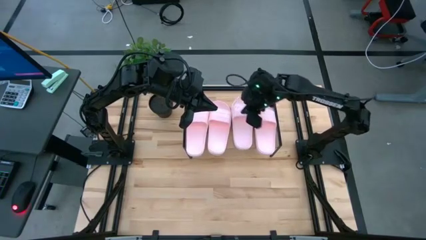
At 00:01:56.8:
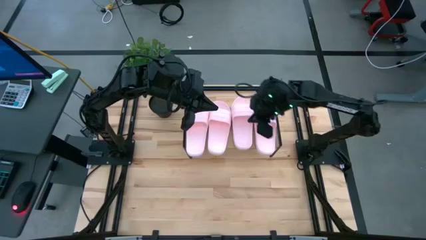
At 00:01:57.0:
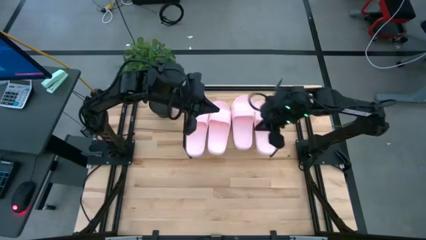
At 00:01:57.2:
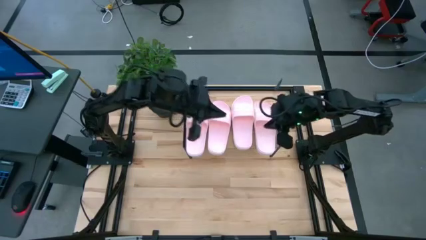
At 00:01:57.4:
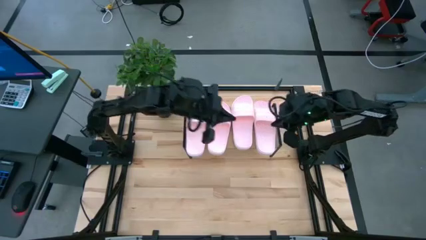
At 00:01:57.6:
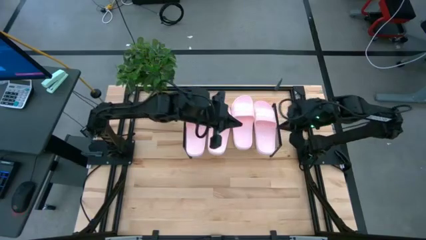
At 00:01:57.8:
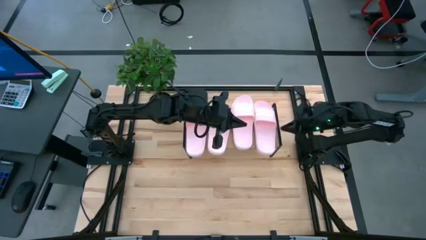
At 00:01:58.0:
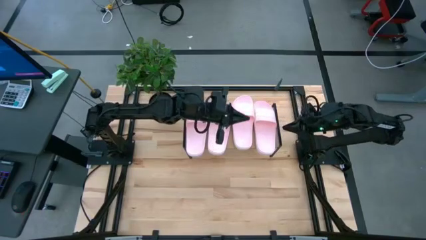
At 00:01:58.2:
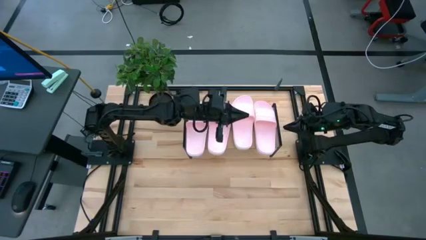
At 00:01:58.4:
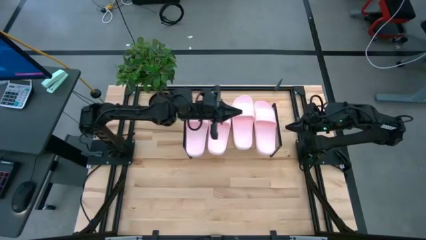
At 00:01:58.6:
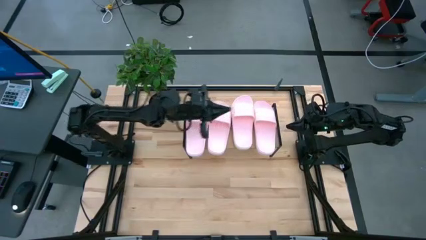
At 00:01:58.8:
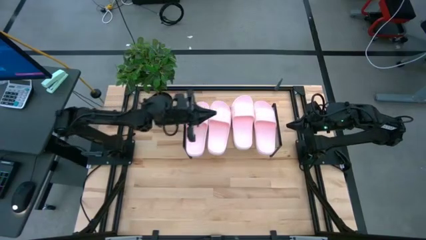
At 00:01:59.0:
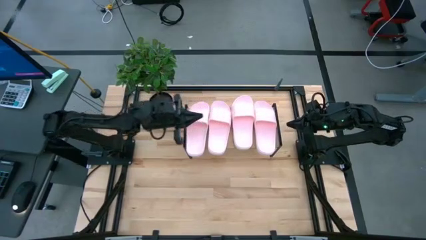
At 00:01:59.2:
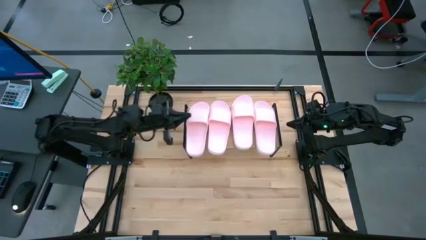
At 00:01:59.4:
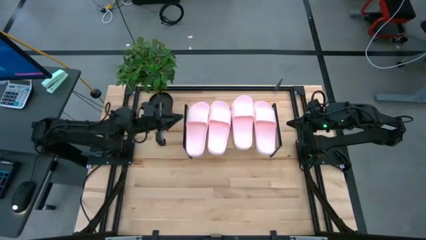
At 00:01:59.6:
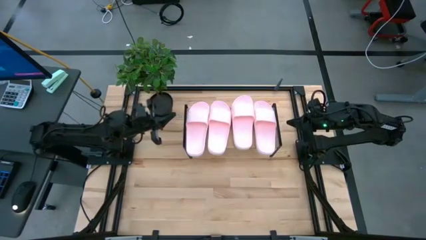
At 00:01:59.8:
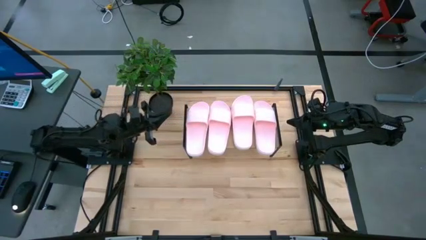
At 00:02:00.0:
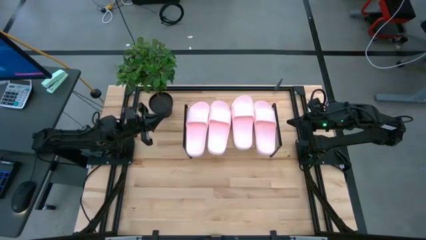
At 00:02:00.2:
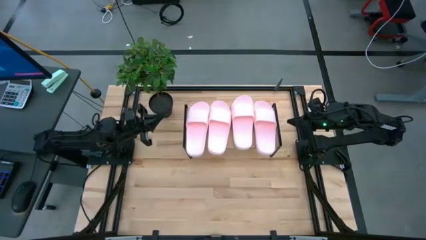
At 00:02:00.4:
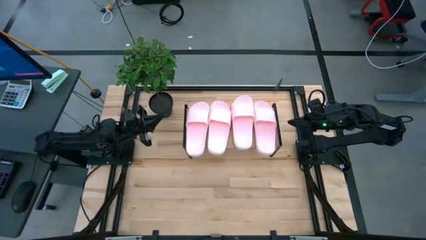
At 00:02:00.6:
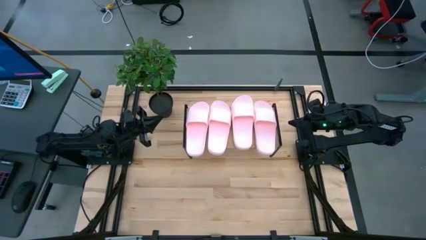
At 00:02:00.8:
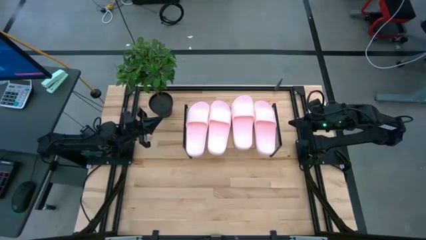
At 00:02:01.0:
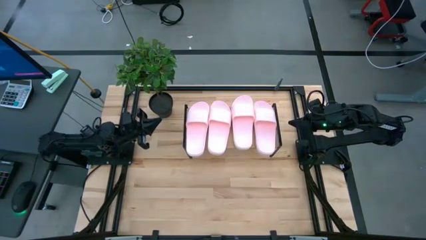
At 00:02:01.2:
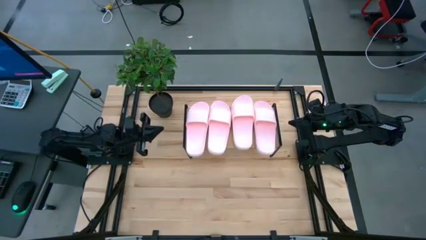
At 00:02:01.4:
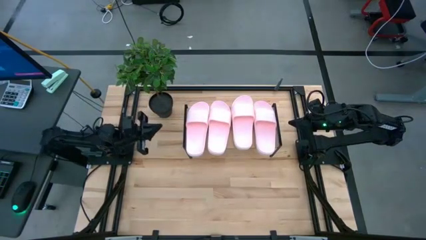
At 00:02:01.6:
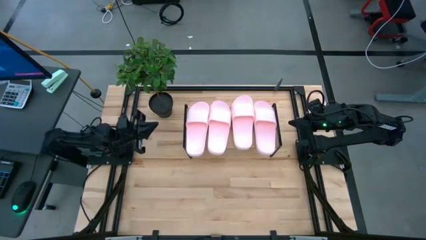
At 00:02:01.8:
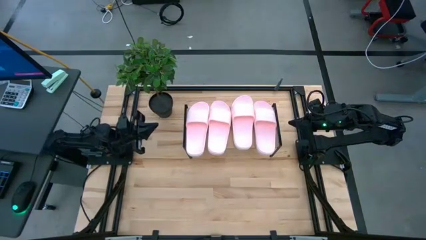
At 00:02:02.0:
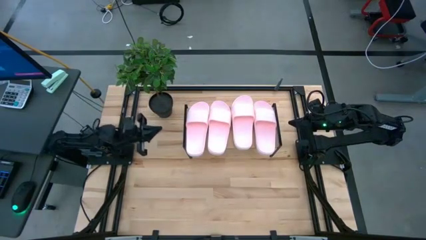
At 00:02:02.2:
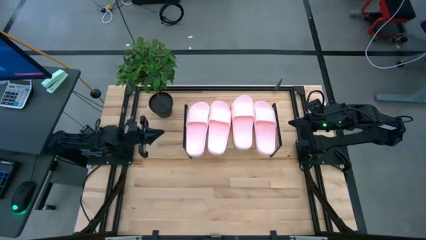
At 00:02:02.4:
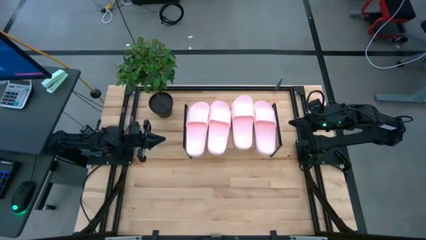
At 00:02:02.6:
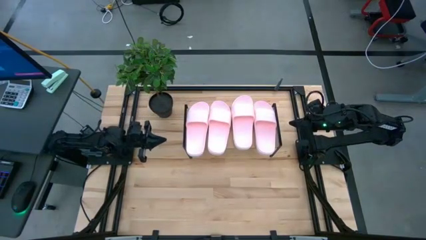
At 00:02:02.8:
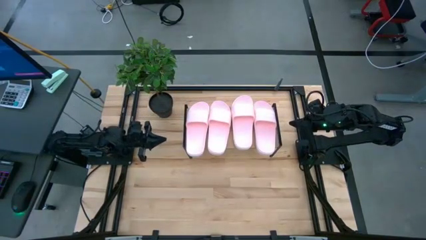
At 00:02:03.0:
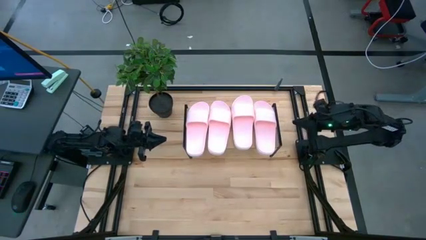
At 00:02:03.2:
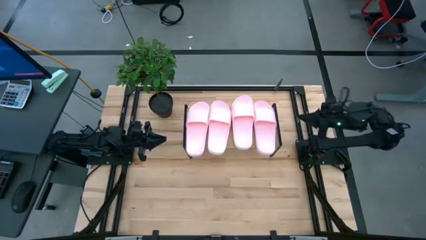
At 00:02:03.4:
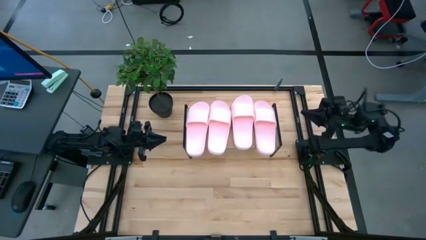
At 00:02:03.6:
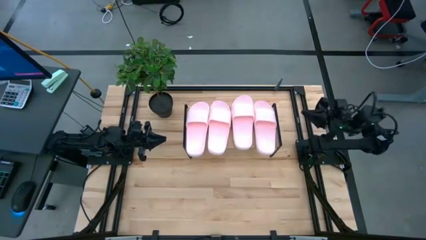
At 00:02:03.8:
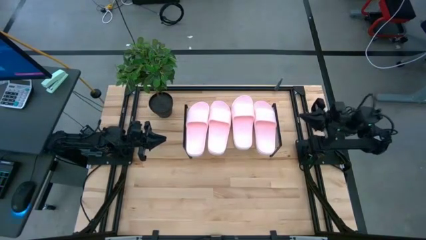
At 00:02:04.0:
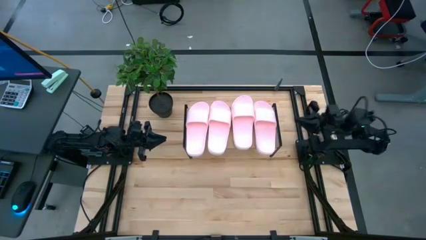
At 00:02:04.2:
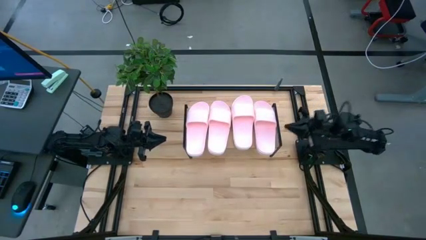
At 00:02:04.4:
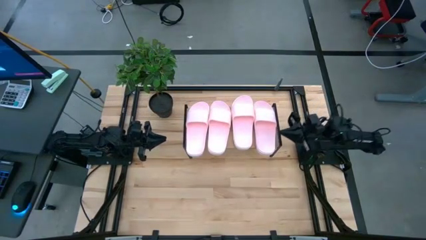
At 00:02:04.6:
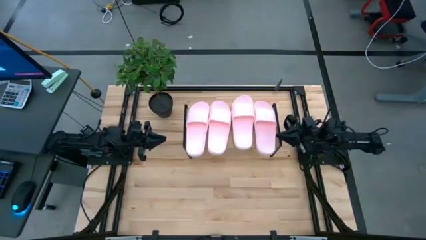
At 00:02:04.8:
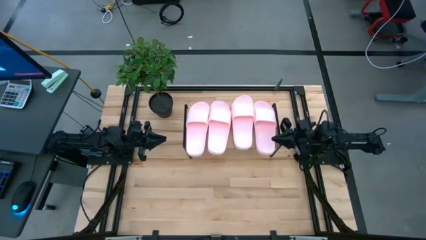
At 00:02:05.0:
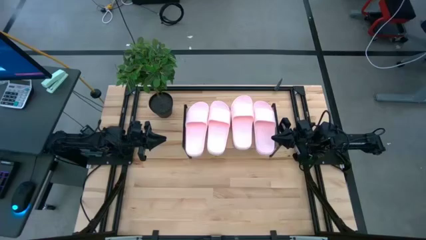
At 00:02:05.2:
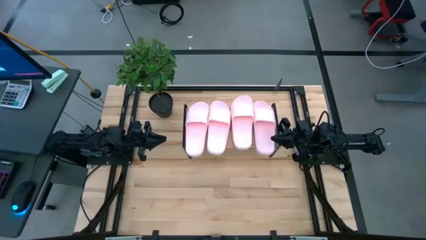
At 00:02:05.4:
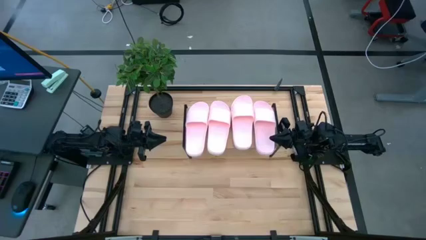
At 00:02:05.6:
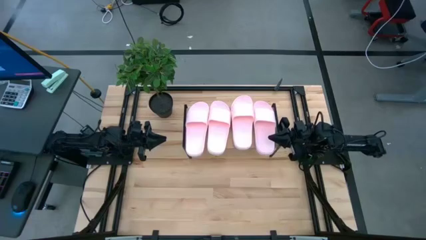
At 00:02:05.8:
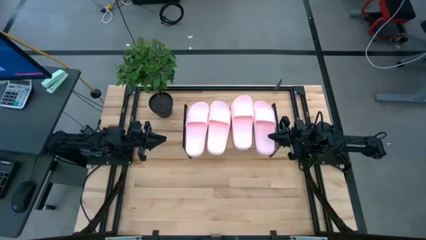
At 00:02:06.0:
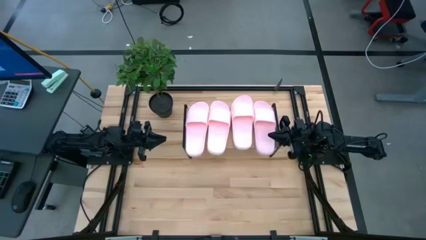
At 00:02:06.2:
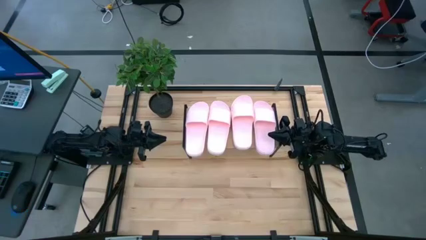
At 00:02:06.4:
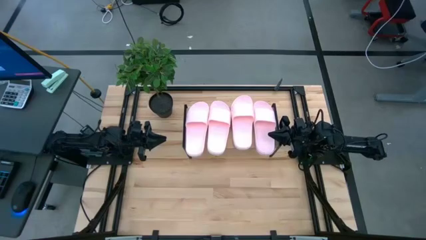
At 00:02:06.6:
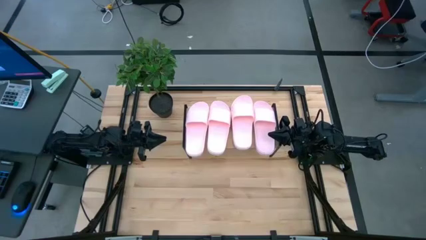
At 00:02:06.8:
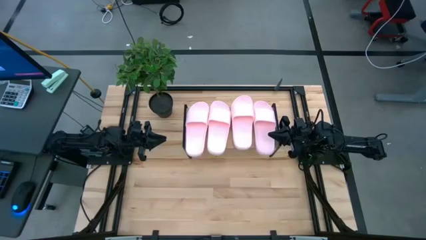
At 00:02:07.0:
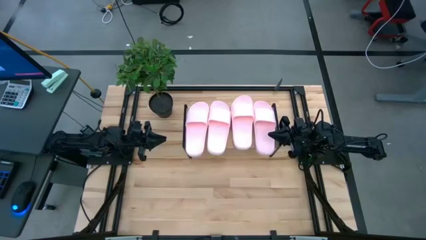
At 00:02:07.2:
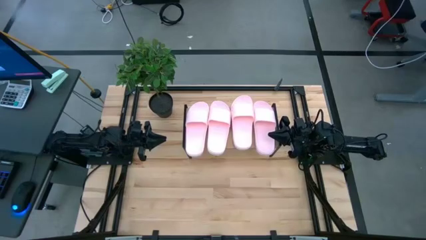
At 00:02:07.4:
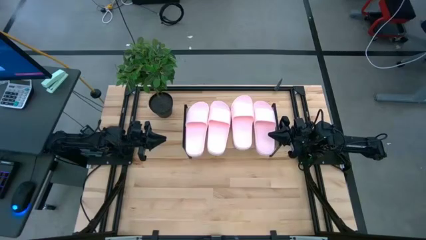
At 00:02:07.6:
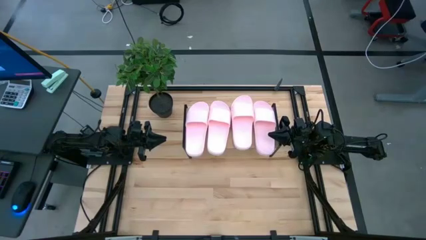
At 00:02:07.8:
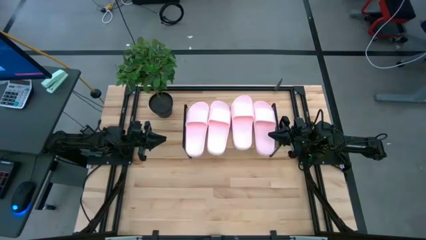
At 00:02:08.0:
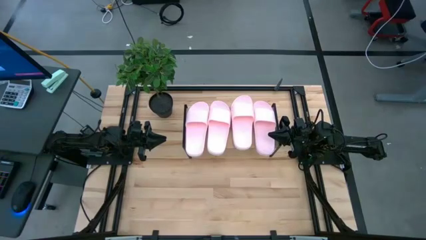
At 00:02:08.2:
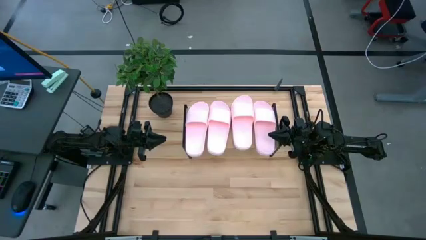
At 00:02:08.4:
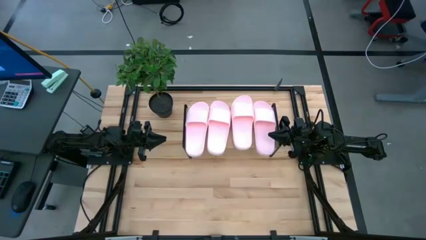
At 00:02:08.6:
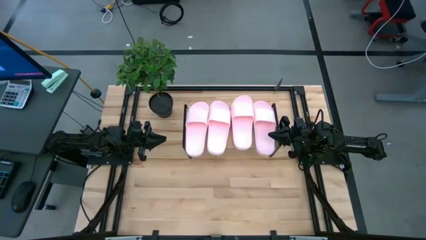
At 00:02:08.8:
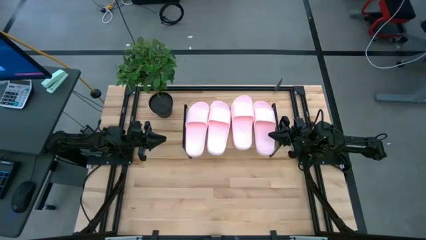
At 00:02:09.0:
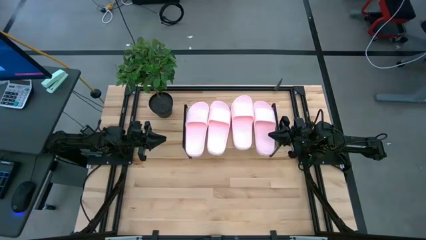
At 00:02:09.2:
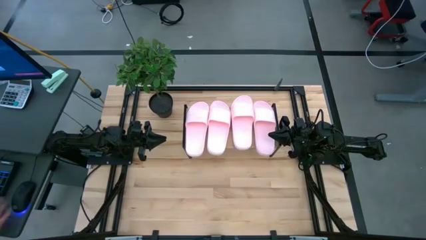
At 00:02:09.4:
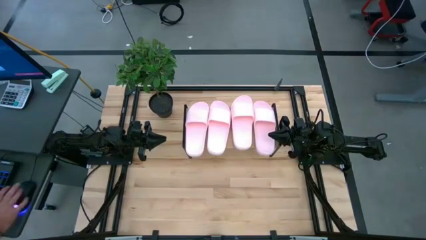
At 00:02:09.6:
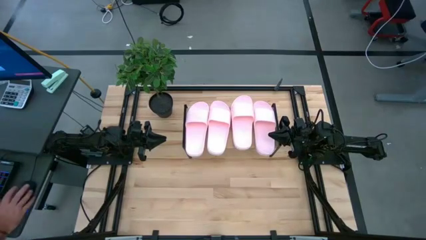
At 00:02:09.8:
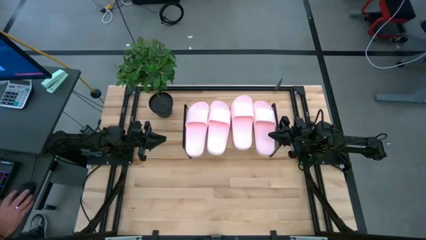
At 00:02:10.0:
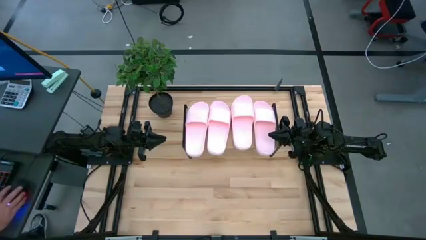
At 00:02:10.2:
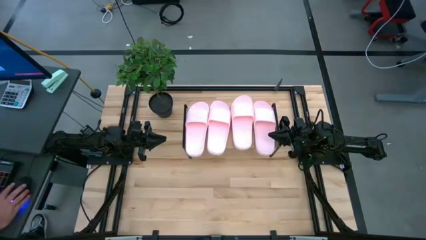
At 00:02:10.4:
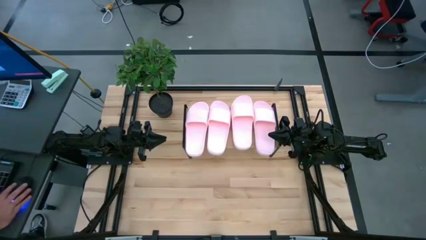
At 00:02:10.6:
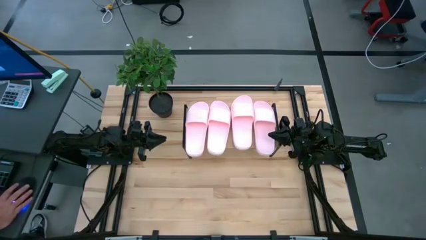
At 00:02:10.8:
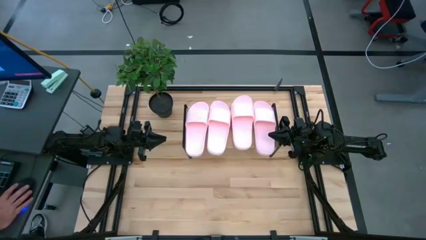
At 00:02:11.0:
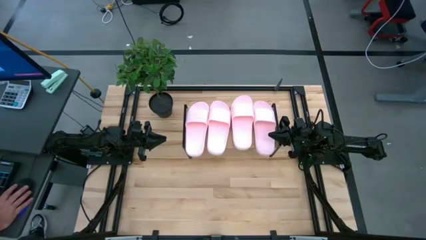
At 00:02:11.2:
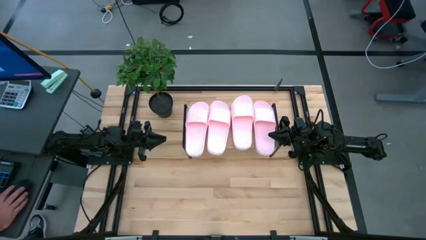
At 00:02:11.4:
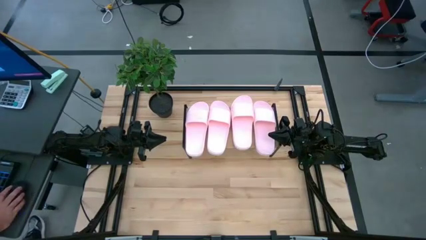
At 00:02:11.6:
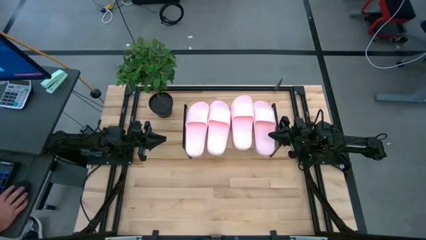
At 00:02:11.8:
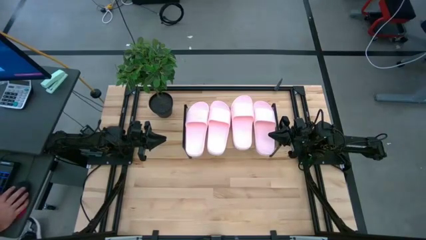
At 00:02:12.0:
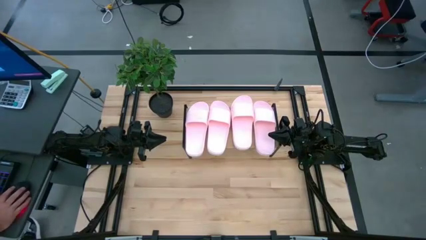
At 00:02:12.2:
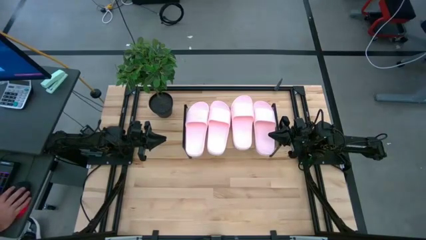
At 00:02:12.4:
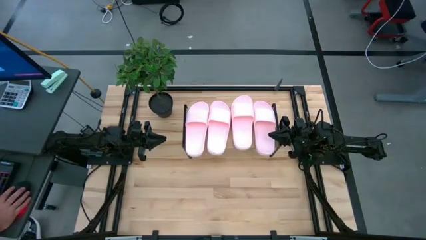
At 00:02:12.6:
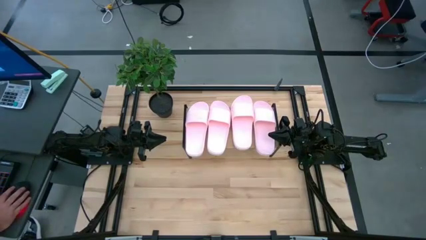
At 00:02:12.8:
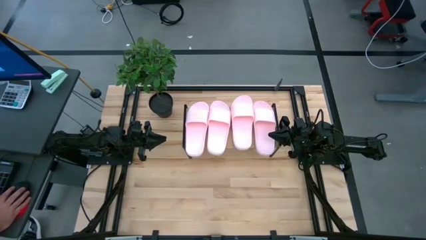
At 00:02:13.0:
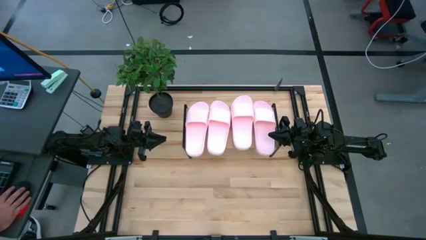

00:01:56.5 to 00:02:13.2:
Task: Pick and place slides into the shelf
Return to Home Position
